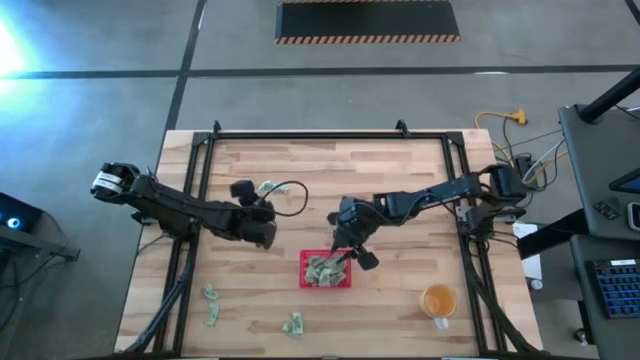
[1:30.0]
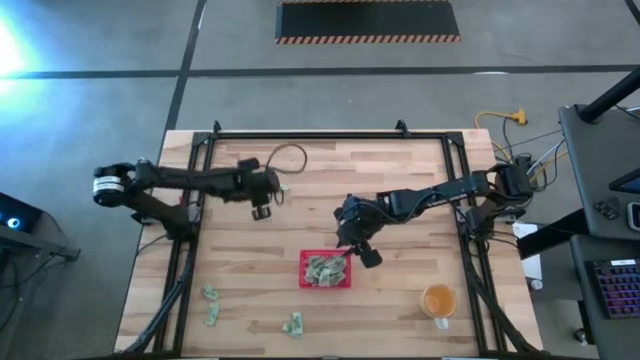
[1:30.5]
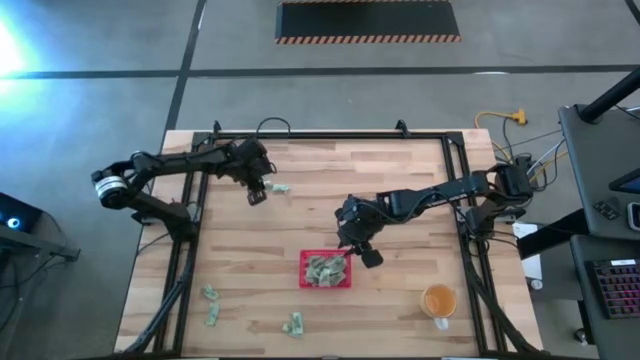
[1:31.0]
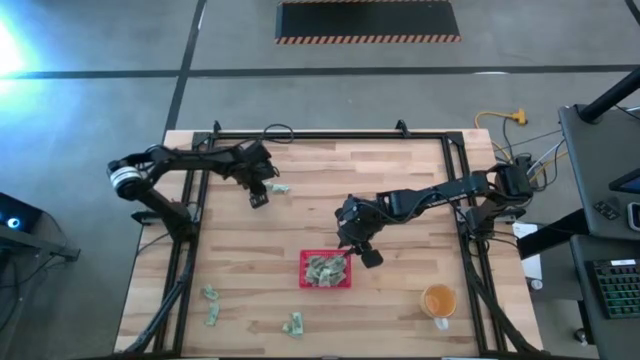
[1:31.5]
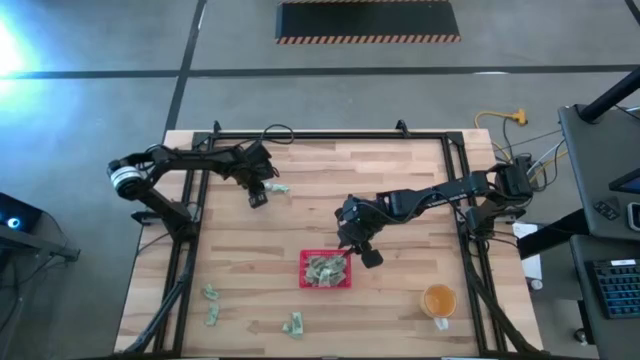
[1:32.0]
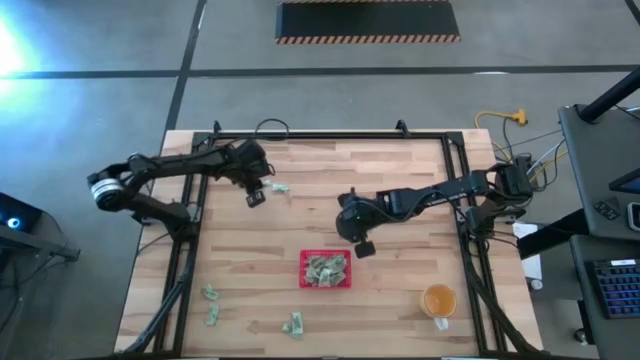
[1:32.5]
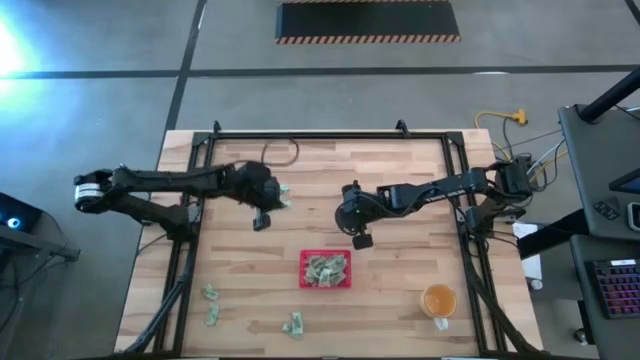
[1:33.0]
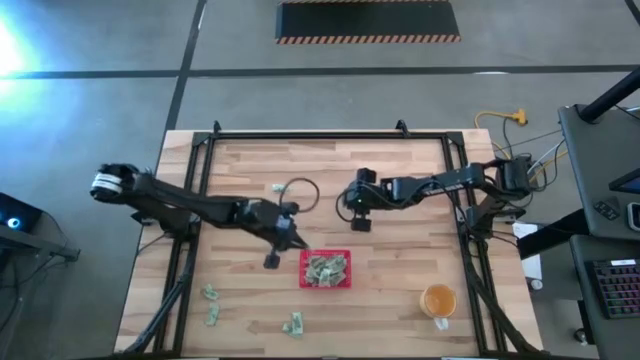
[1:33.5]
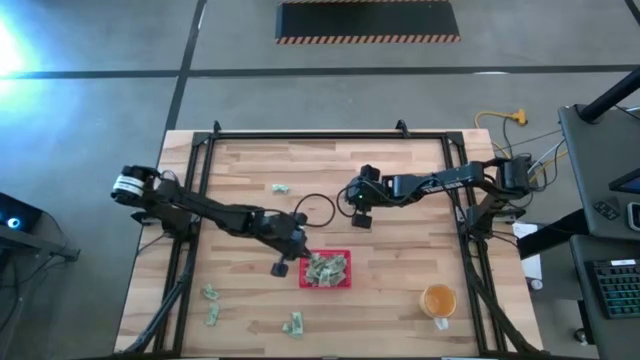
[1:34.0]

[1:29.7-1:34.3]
Task: Pick and place Stevia / Truvia into bins
Put the white stevia packet into the red bin

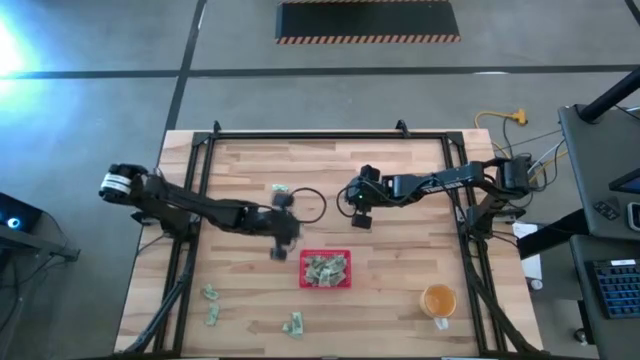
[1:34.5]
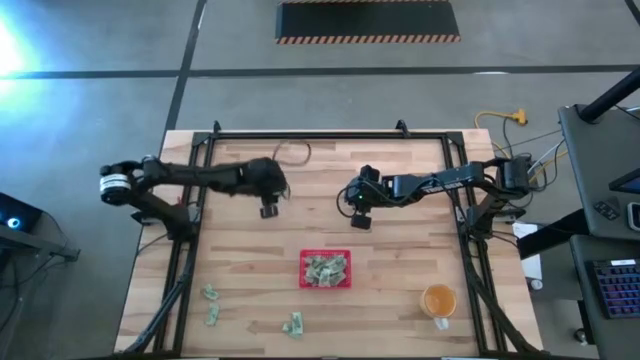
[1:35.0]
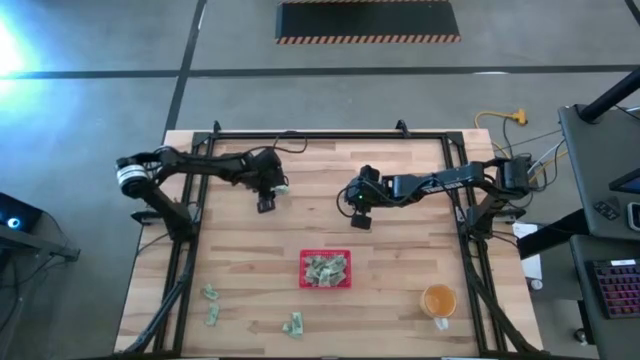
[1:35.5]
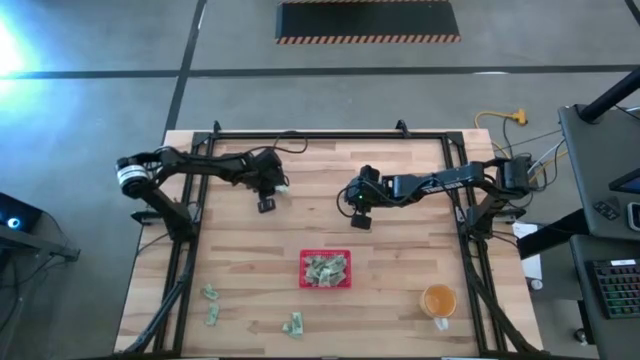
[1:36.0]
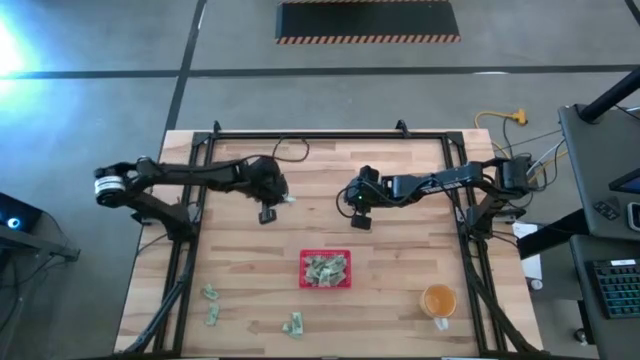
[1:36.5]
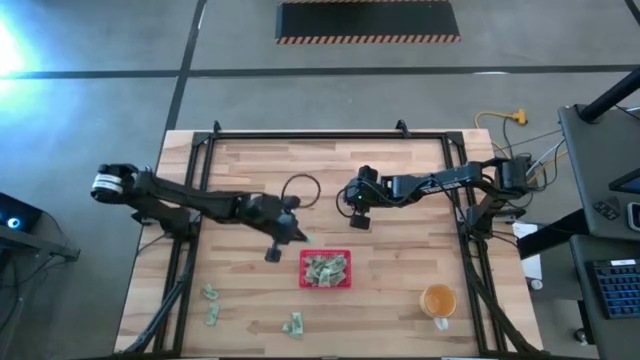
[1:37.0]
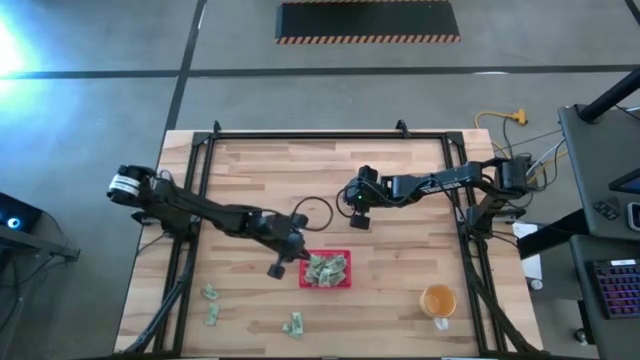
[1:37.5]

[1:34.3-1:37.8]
Put the white stevia packet into the red bin

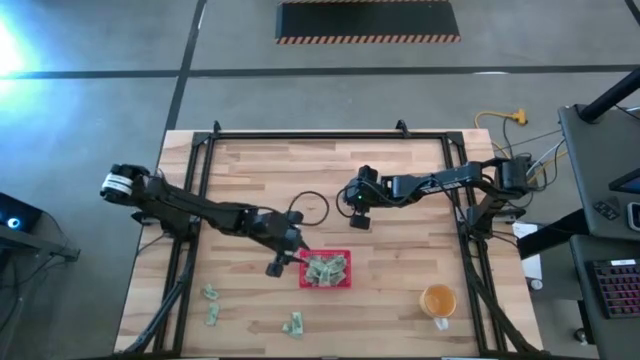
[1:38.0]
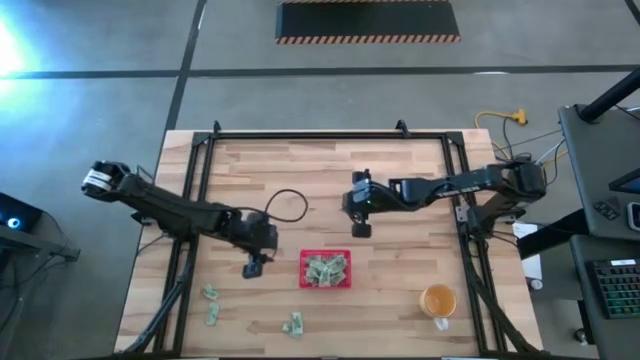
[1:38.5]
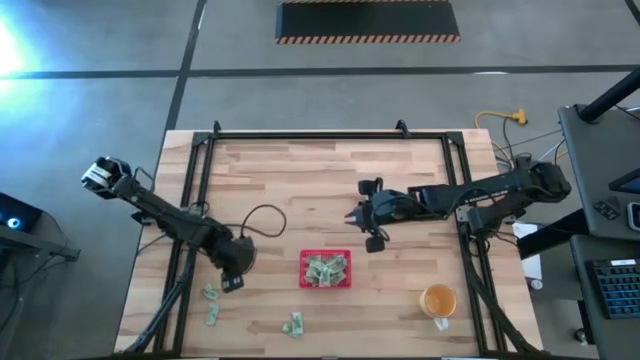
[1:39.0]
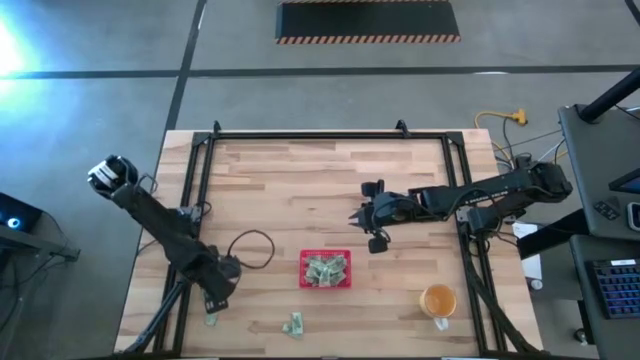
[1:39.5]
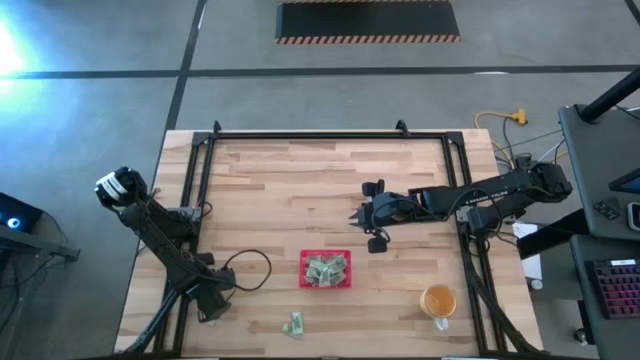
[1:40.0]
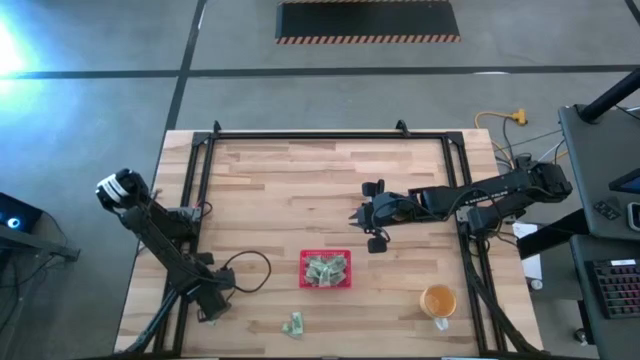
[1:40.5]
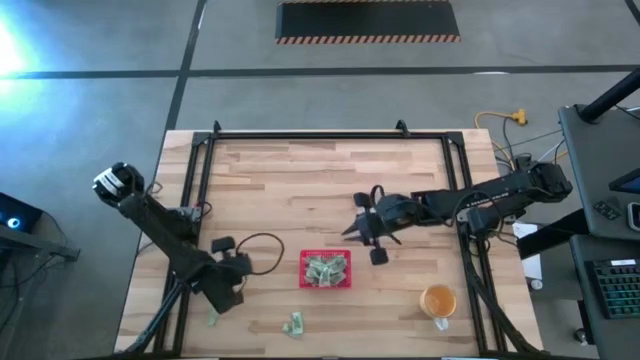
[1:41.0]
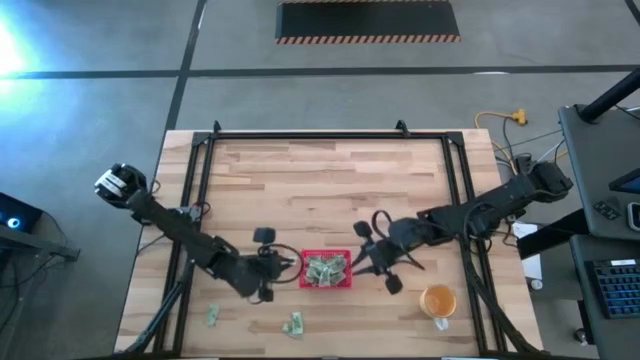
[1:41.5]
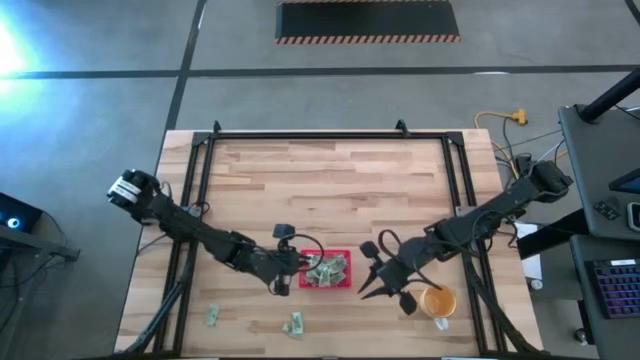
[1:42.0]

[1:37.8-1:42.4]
Put the white stevia packet into the red bin

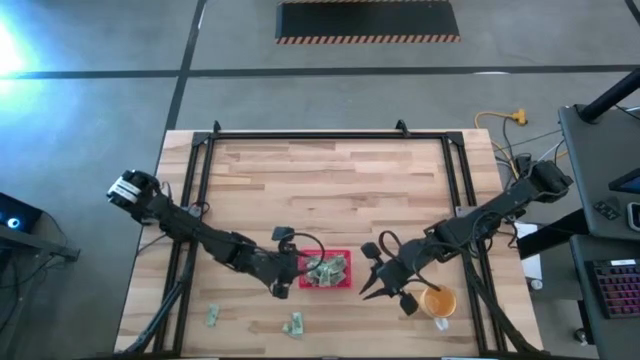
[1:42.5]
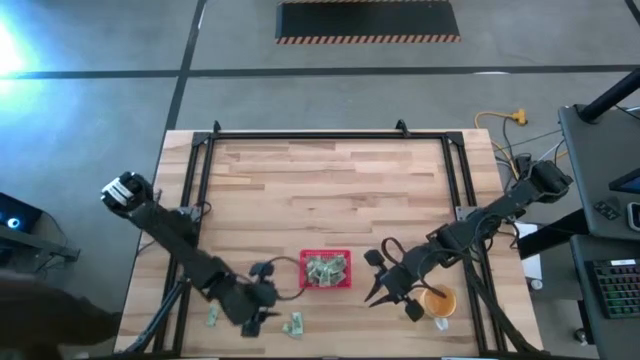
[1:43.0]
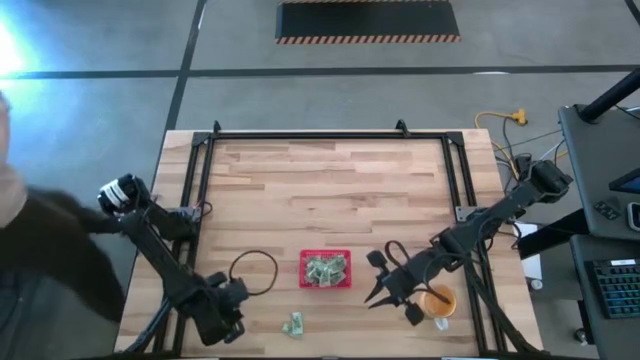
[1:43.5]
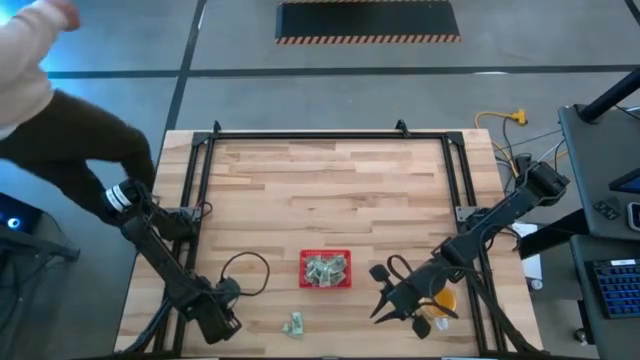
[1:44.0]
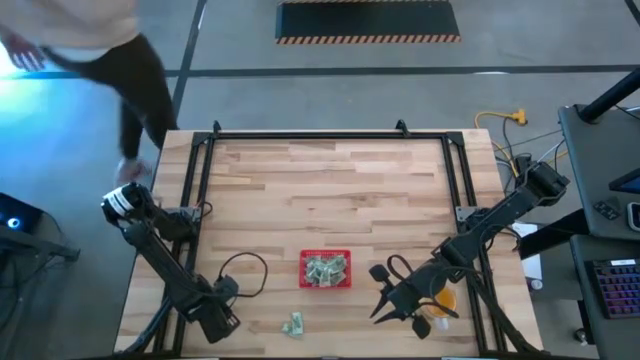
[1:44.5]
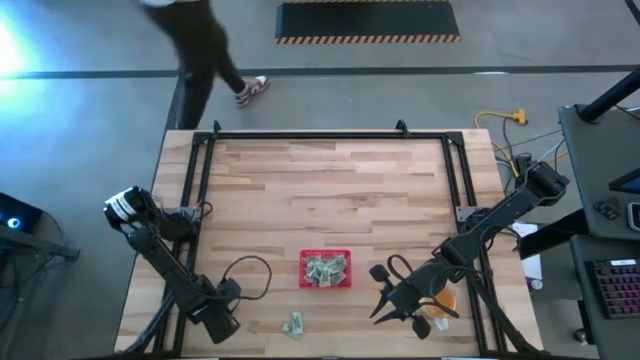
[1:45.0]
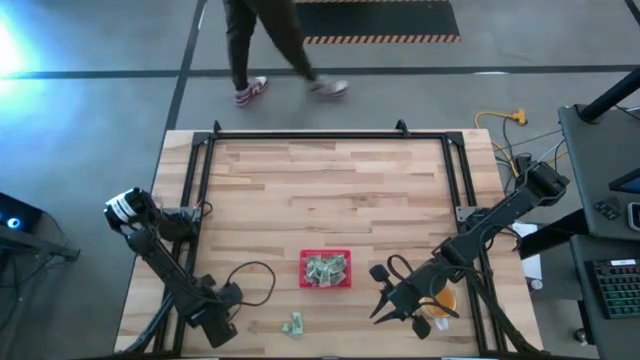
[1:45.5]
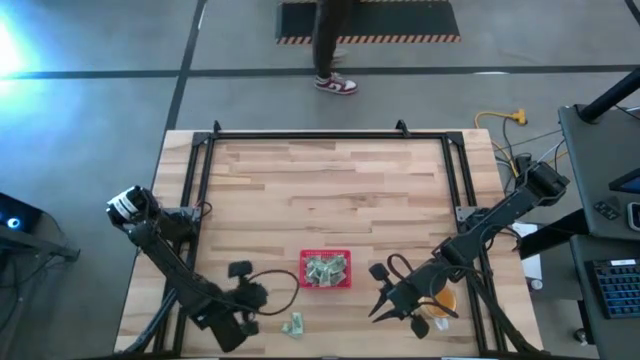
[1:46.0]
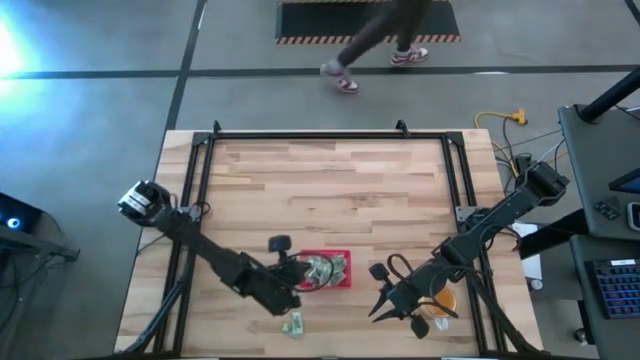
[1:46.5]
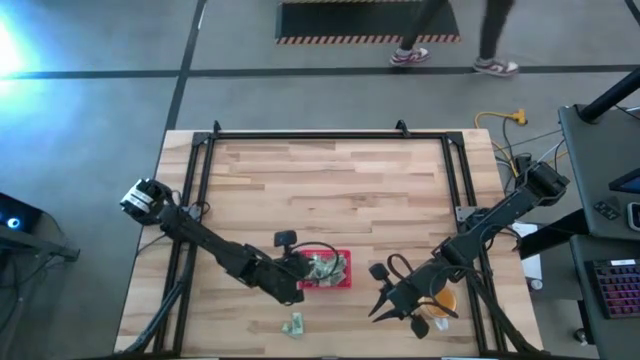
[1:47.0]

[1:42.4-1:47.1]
Put the white stevia packet into the red bin

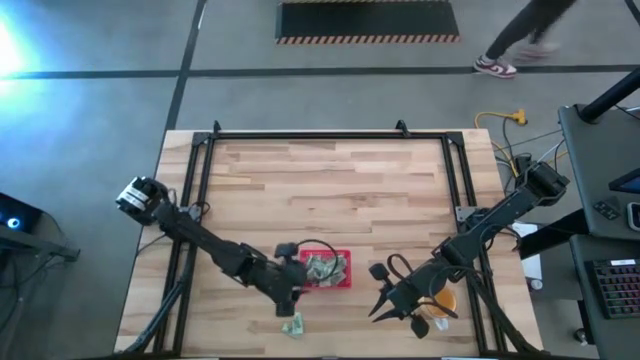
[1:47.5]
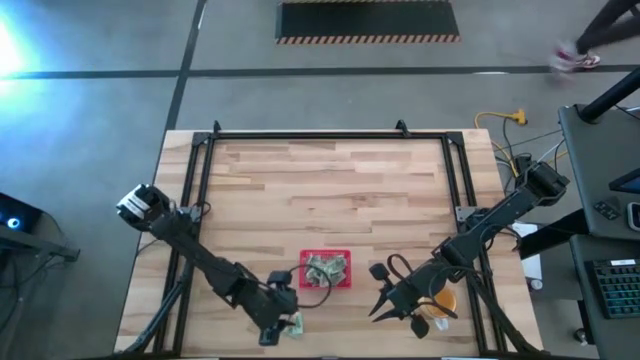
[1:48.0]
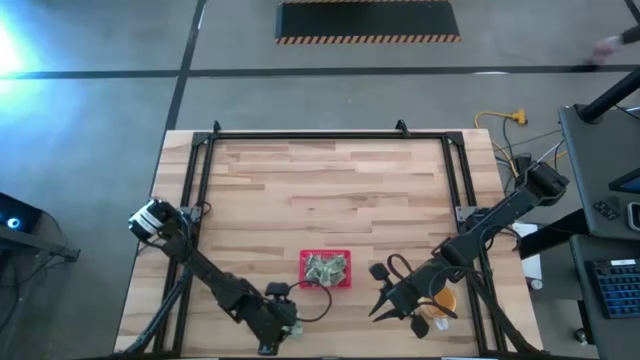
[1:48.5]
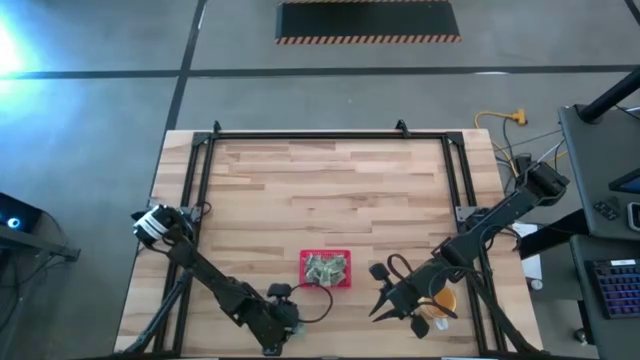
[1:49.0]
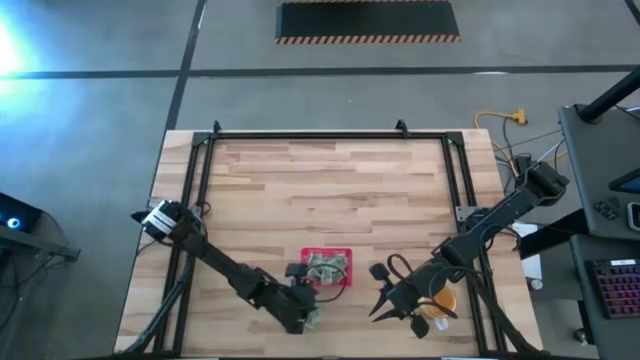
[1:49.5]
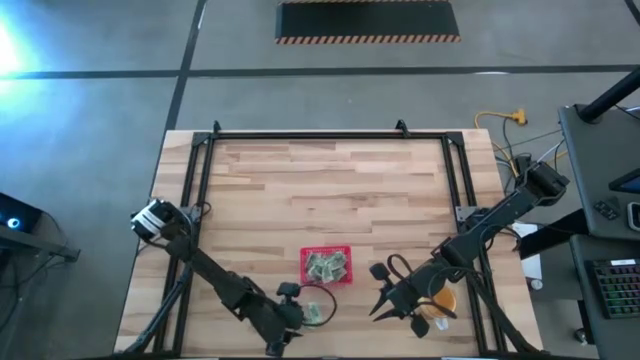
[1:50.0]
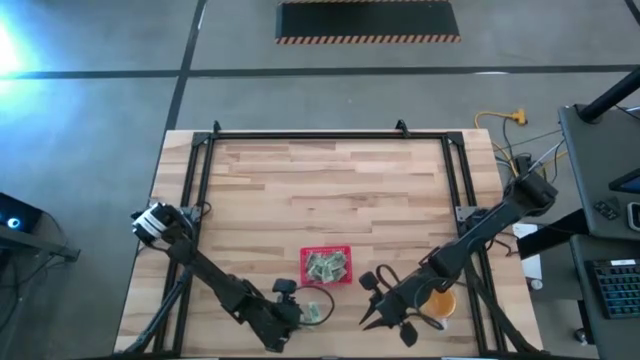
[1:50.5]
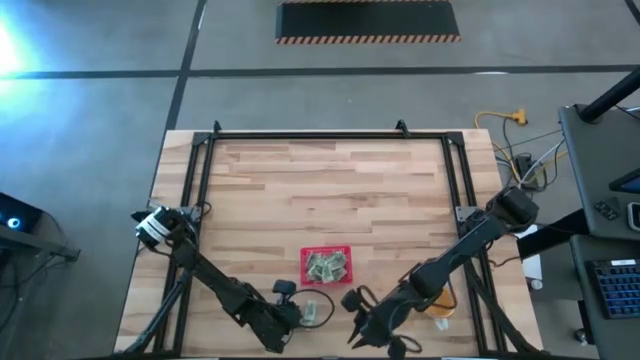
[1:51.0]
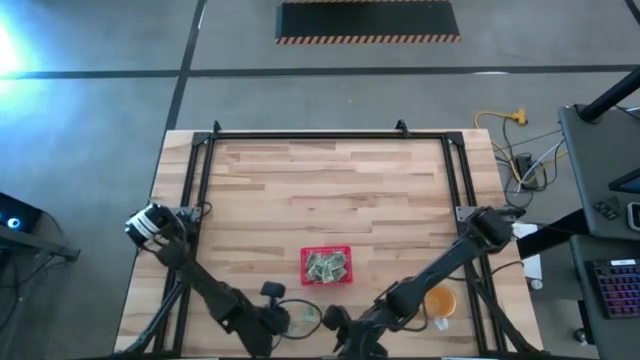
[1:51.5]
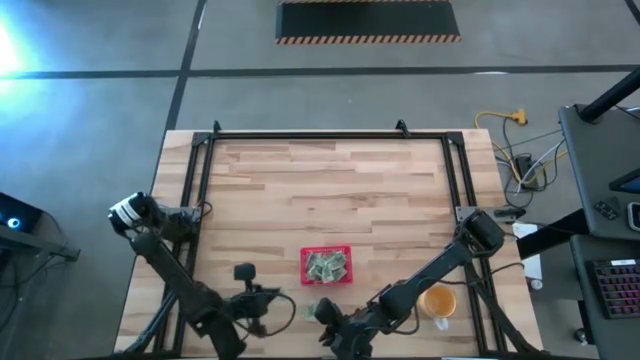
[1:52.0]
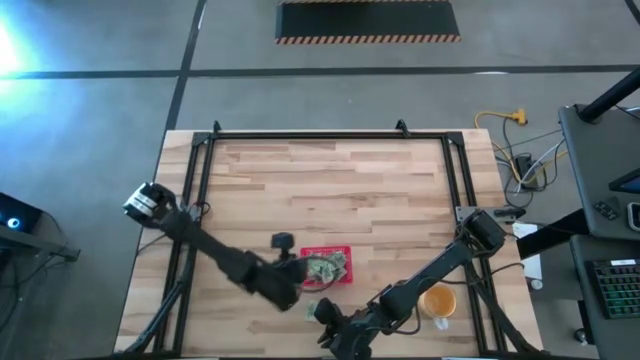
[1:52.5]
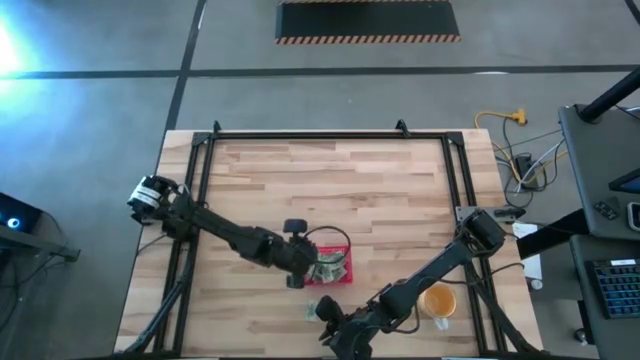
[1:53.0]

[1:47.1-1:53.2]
Put the white stevia packet into the red bin
